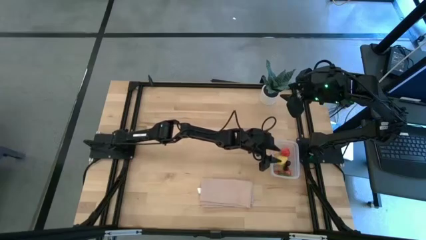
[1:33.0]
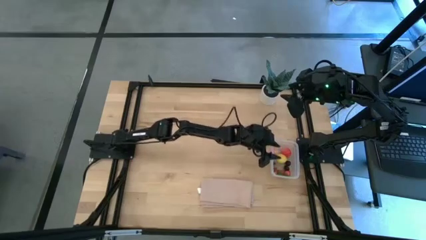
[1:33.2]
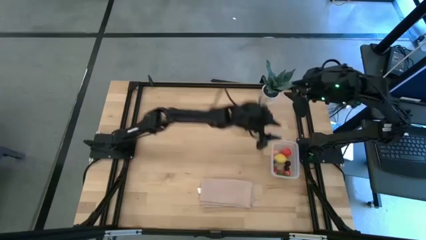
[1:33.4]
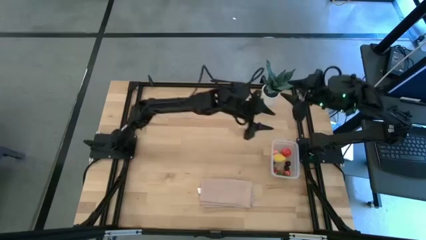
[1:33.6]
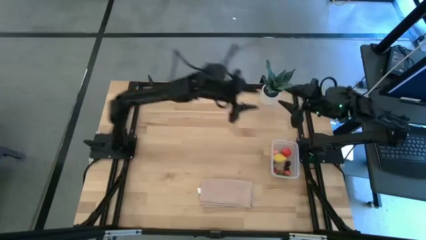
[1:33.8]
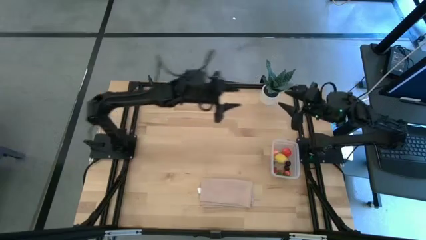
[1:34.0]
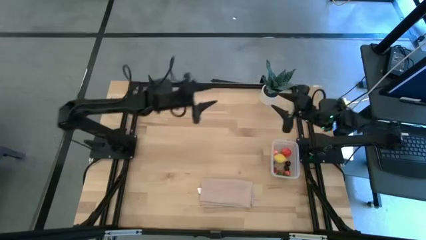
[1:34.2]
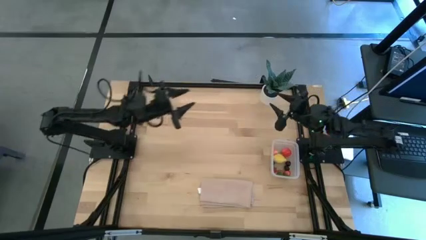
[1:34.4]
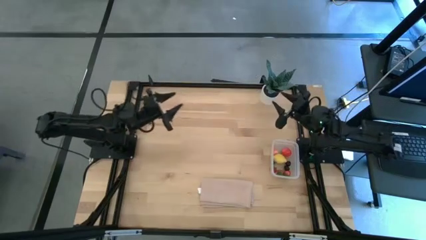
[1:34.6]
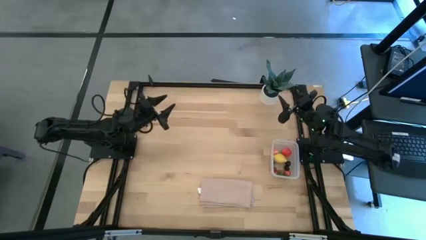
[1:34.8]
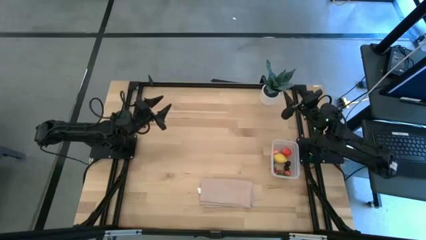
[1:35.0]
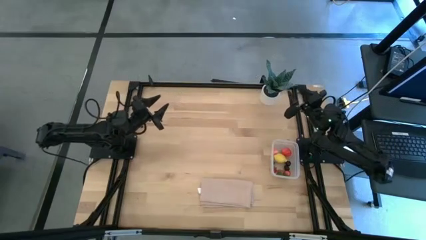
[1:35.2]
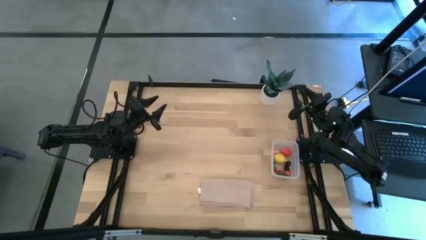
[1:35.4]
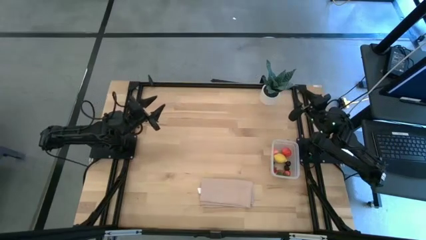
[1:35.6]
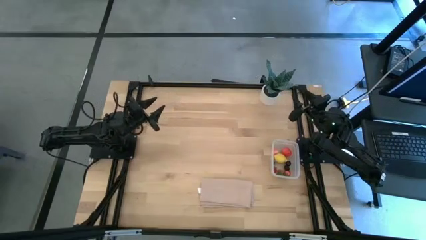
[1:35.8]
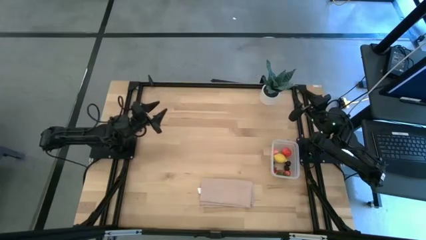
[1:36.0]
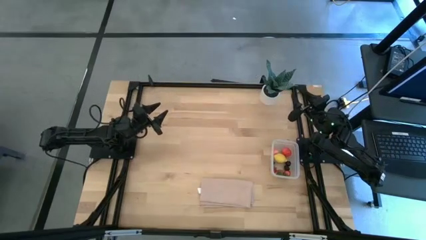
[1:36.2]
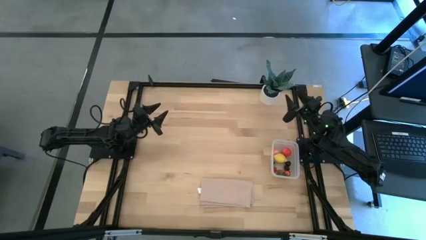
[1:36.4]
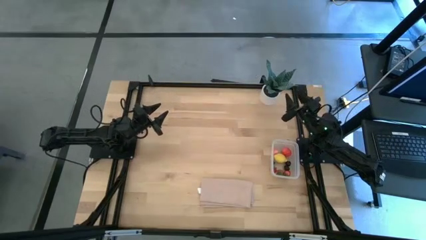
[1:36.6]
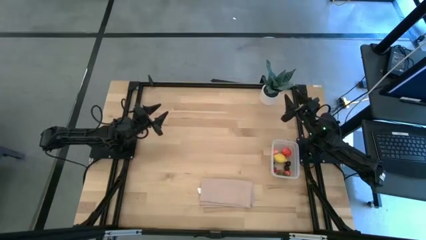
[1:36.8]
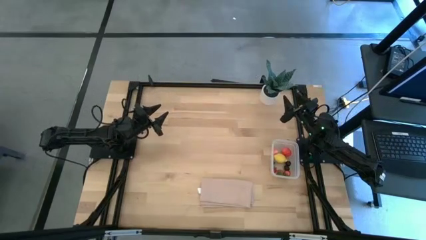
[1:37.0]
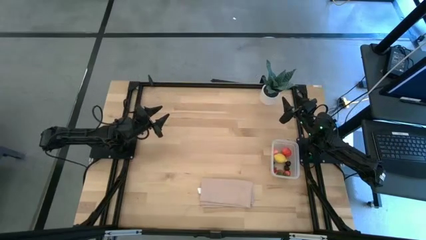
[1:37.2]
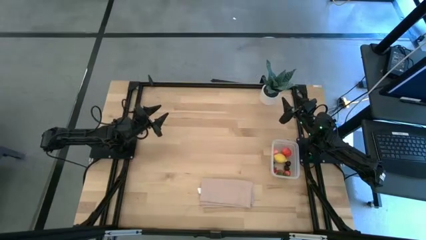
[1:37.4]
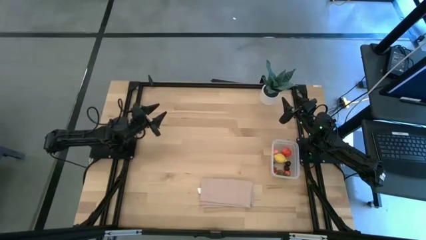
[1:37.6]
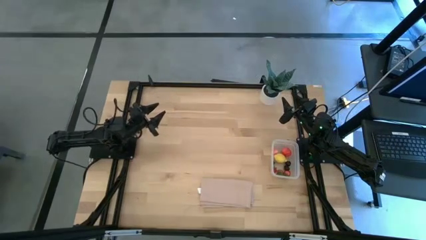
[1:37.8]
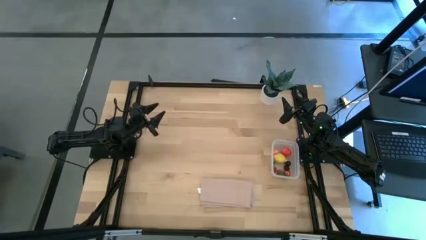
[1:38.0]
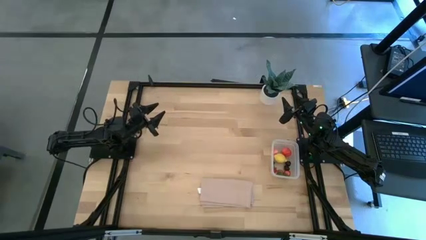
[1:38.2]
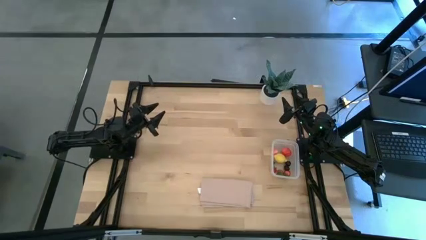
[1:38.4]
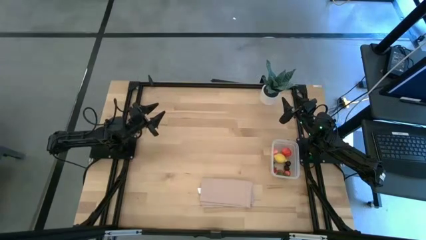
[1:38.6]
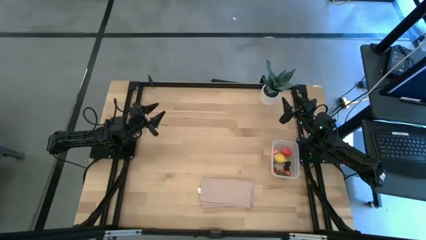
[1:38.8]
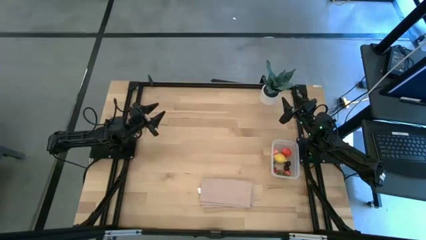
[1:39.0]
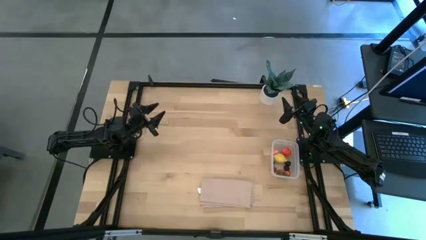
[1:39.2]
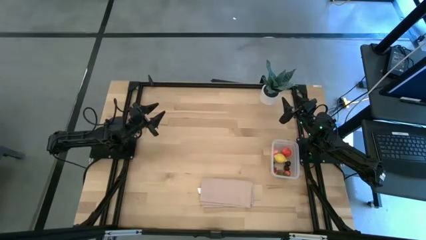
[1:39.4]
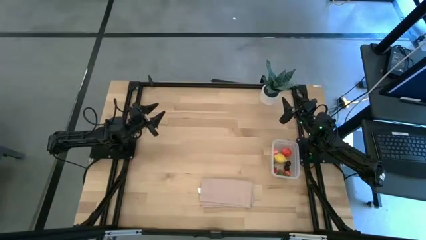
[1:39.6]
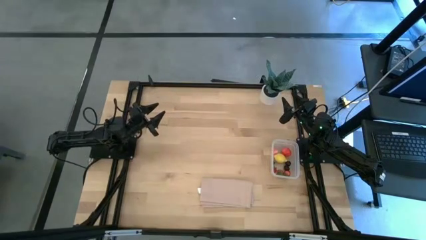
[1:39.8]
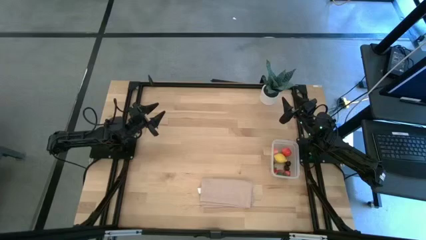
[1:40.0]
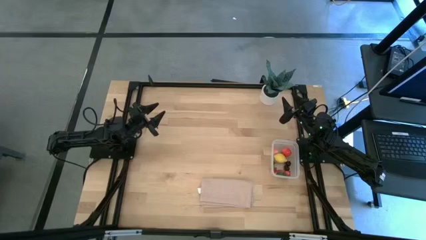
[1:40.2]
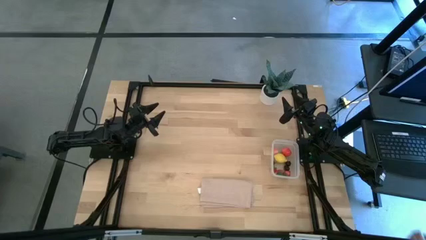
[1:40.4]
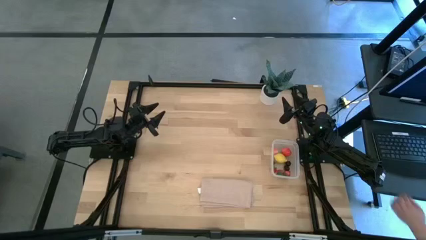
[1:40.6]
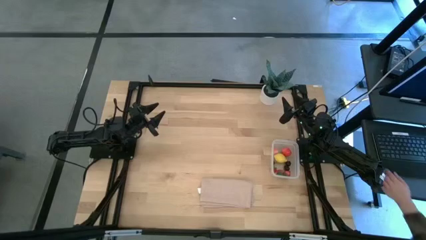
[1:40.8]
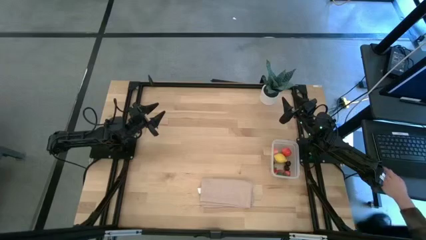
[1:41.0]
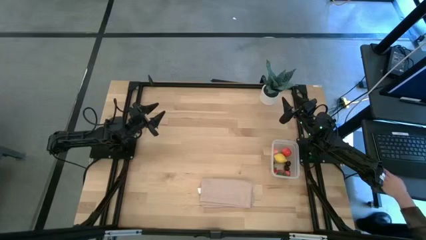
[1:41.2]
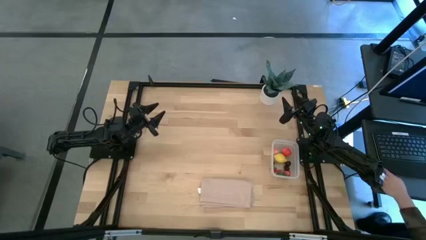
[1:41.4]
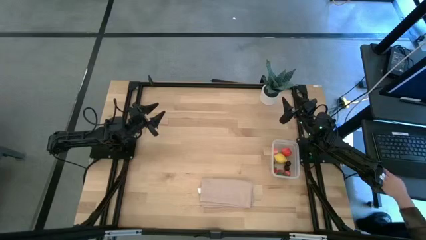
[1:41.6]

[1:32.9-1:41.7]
Task: Pick and placing Produce into tupperware
Return to Home Position

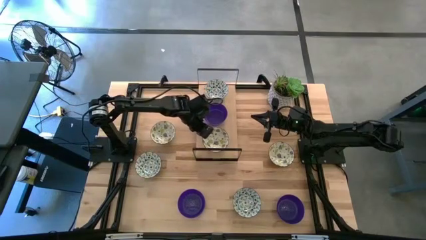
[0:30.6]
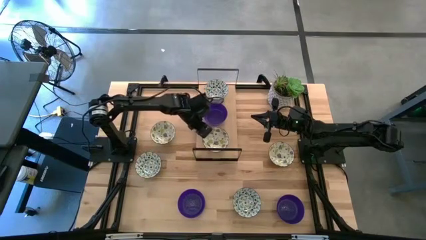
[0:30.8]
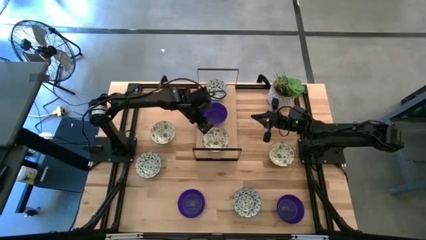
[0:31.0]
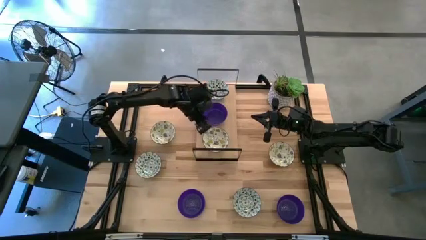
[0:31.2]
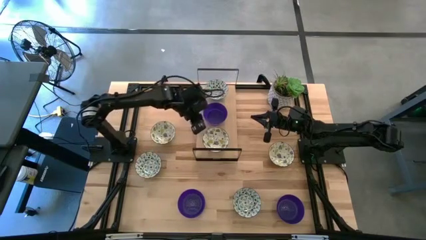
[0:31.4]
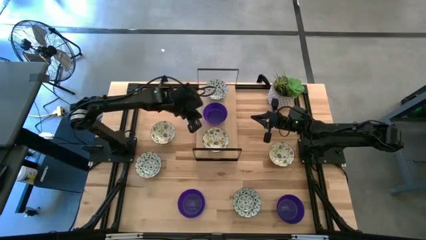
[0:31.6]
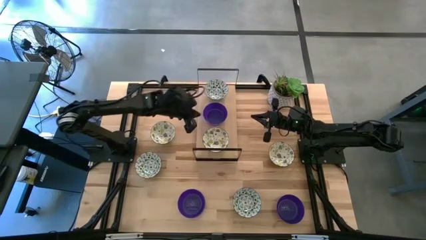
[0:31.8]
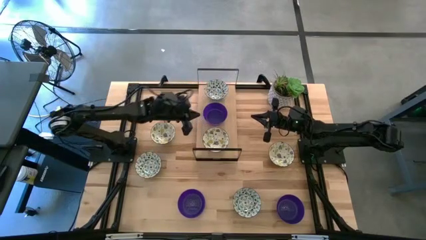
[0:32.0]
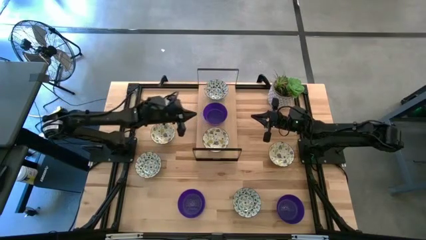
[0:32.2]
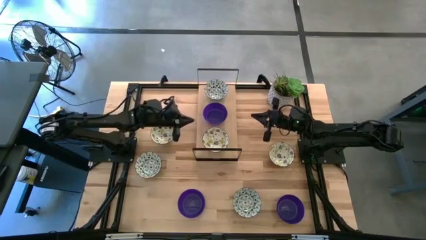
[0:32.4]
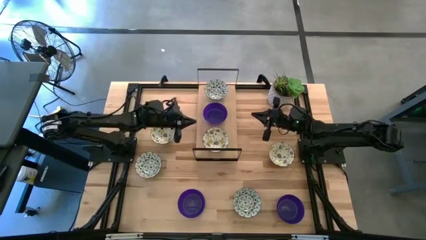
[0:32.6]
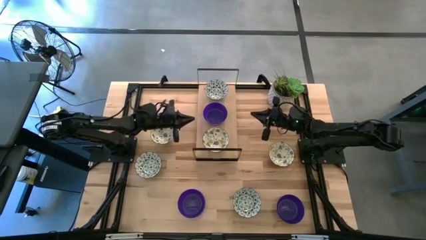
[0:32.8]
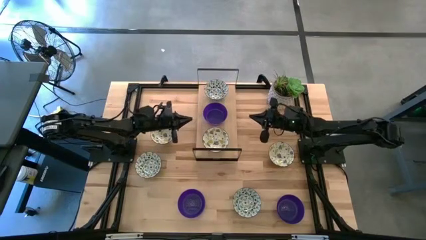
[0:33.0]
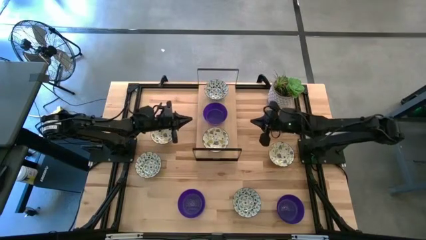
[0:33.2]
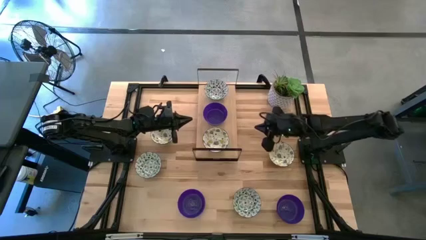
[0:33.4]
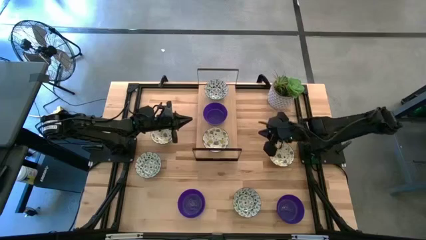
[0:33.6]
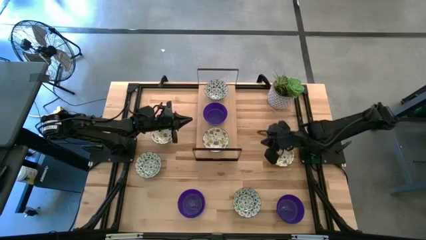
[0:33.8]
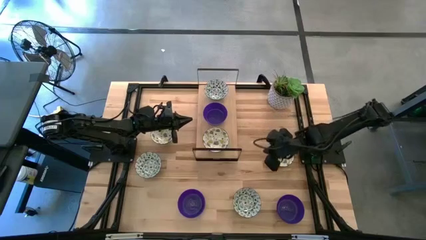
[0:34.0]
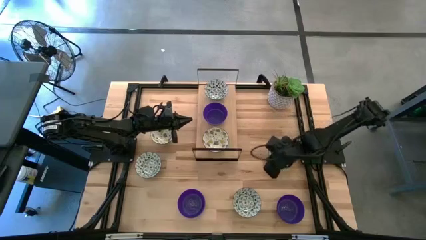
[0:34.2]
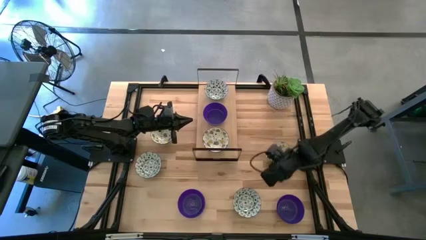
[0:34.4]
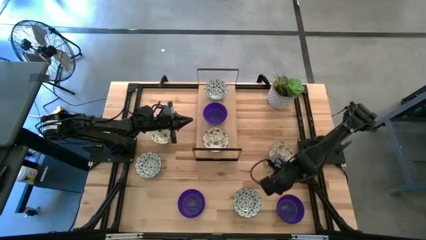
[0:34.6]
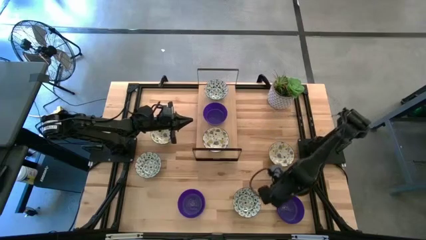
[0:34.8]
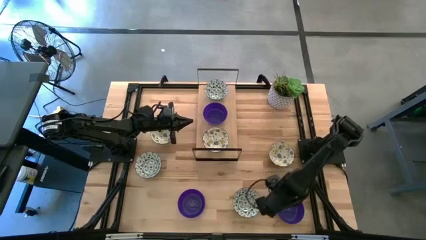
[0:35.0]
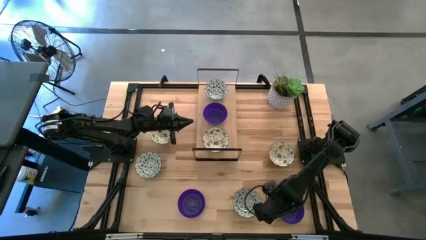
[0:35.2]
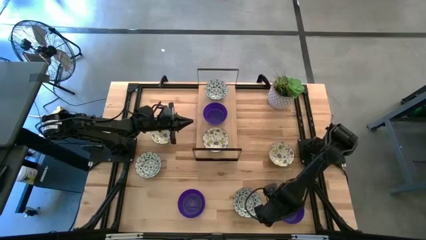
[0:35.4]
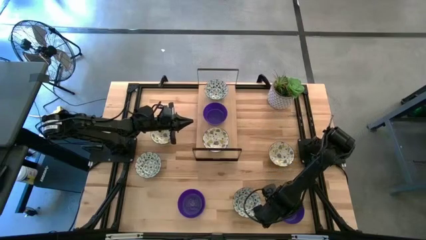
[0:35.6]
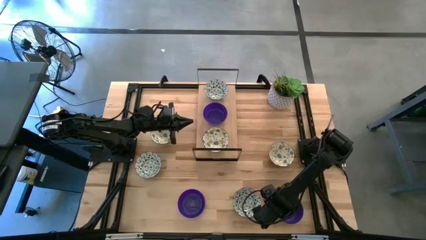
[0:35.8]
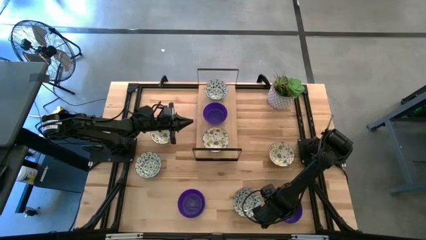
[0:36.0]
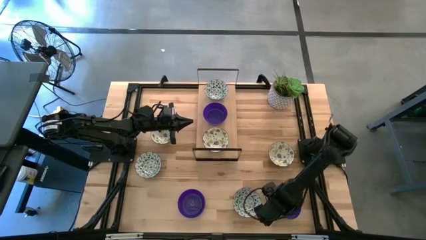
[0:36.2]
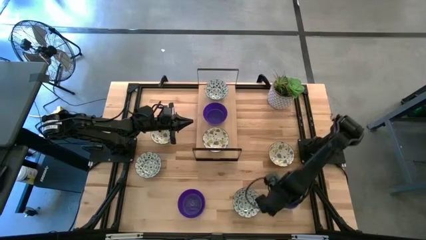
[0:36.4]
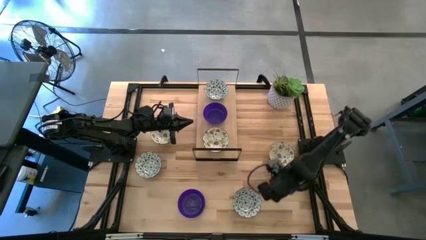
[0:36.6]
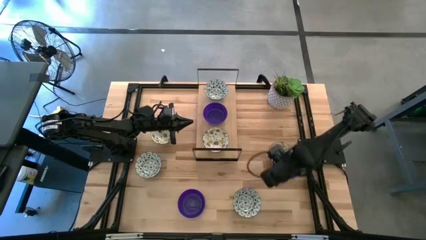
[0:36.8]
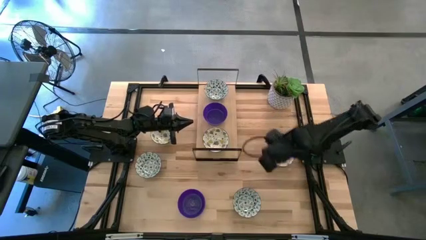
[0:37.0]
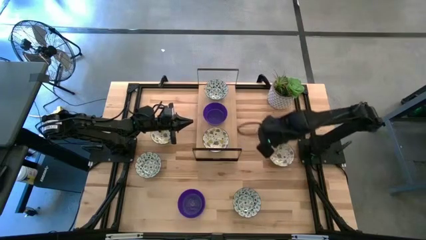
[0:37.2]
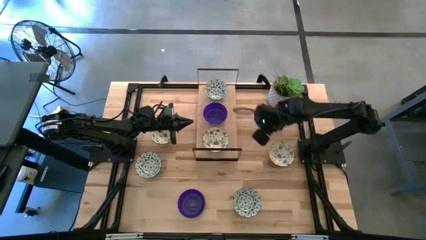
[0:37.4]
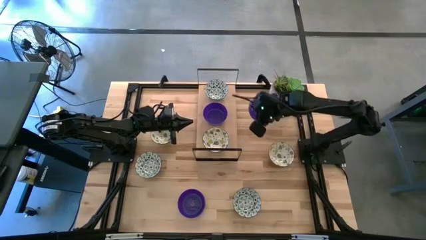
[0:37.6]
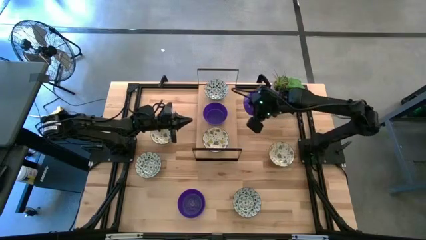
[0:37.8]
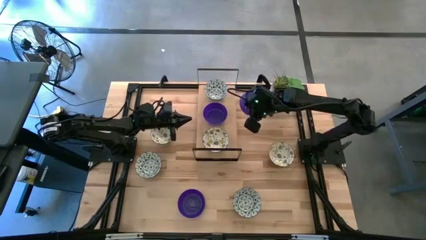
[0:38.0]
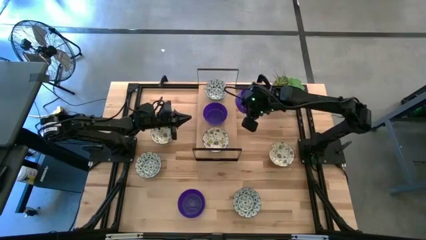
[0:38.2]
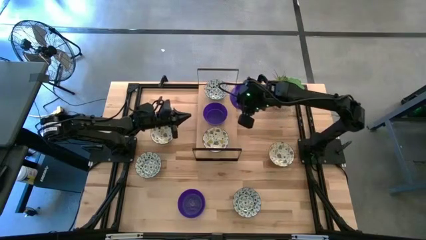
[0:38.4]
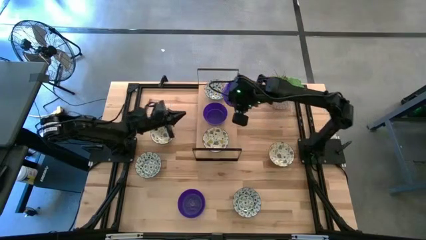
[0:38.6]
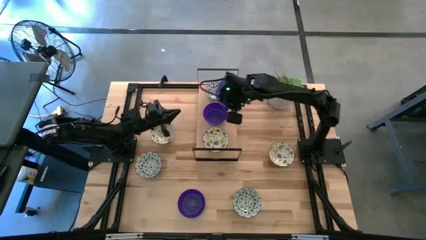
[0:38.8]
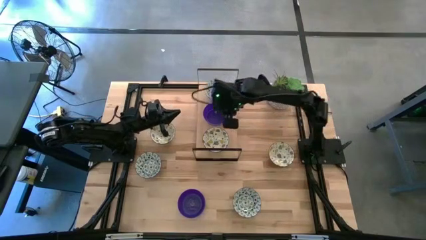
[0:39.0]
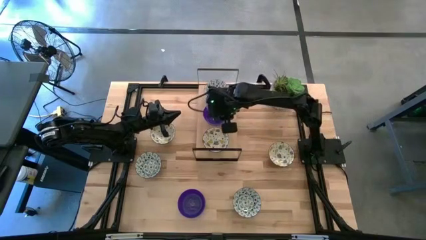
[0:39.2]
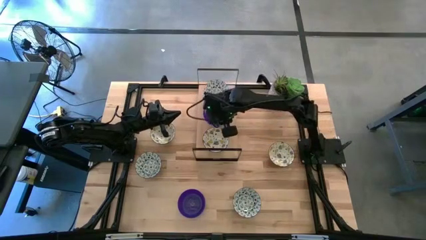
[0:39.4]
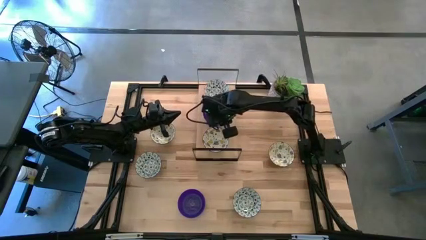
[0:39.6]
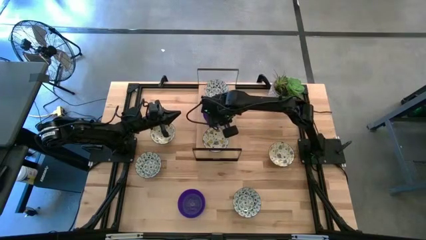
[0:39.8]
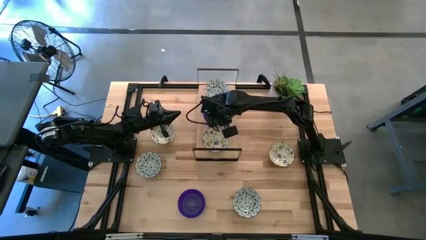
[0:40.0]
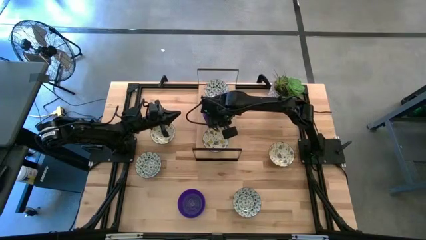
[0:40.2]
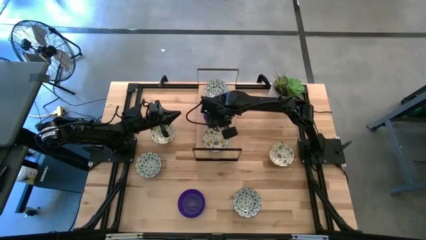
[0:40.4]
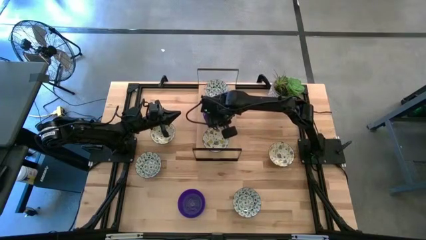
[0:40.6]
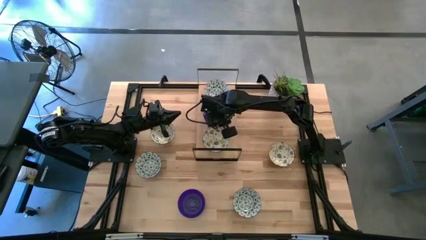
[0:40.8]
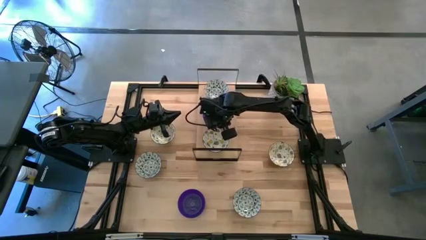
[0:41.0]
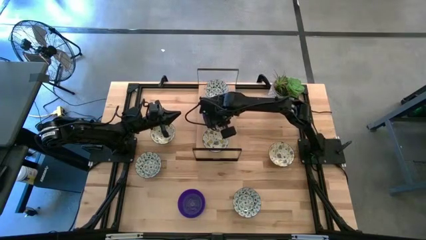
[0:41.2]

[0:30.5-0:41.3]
Task: Pick & Place Mini bowls
Stack the right violet bowl on top of the violet bowl on the shelf
